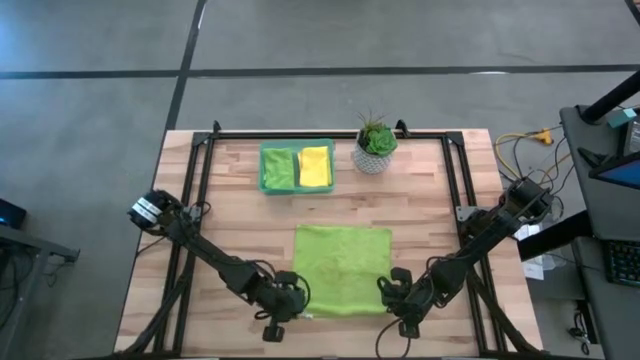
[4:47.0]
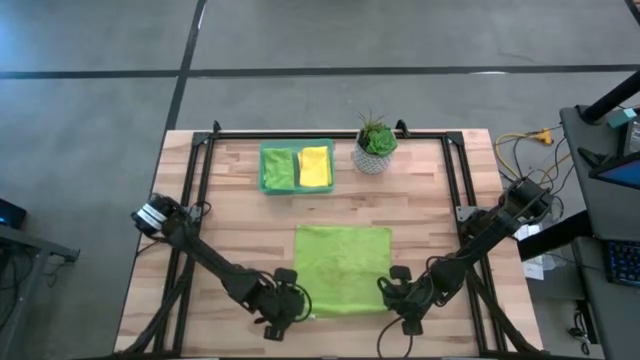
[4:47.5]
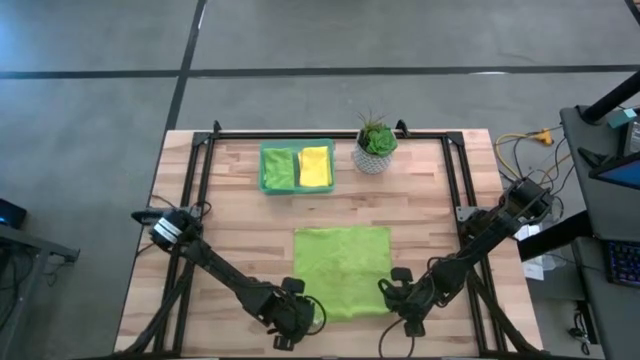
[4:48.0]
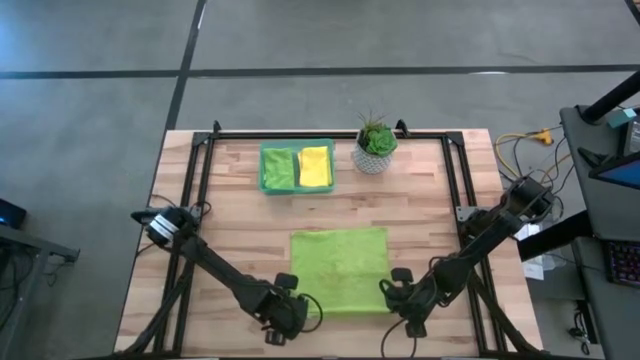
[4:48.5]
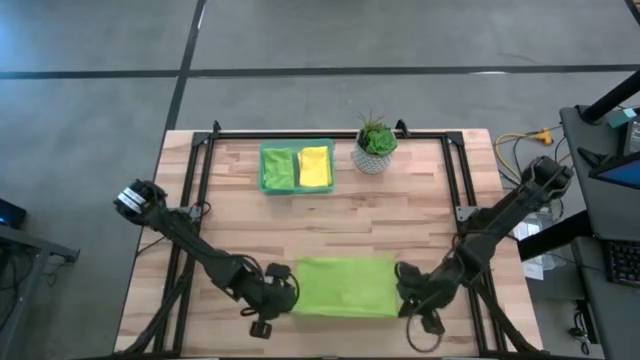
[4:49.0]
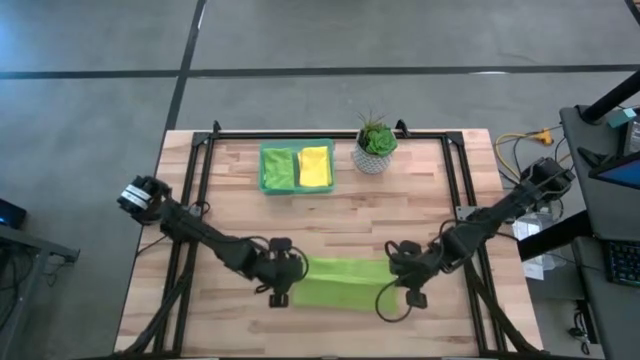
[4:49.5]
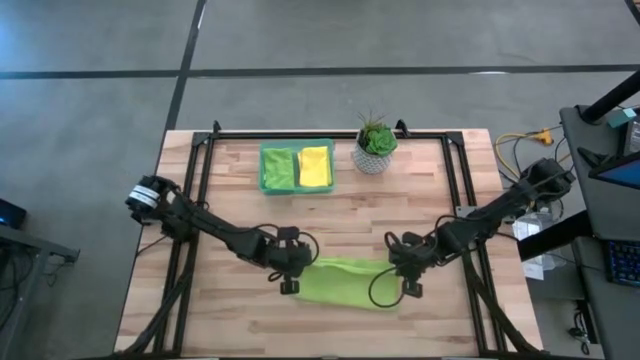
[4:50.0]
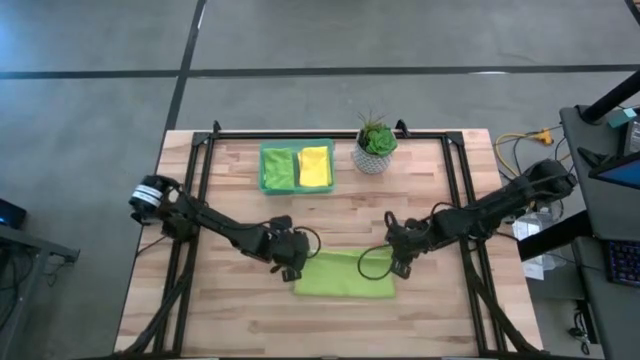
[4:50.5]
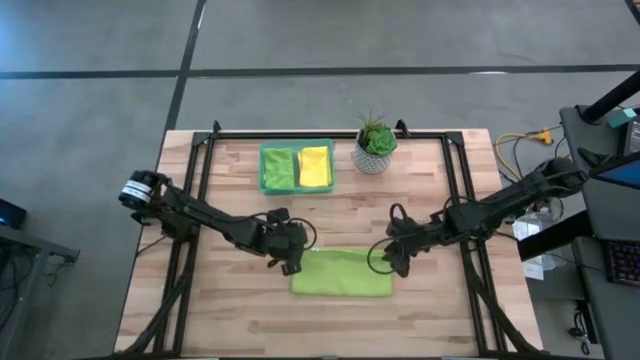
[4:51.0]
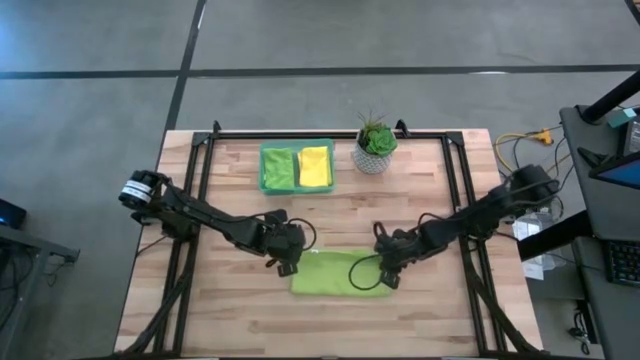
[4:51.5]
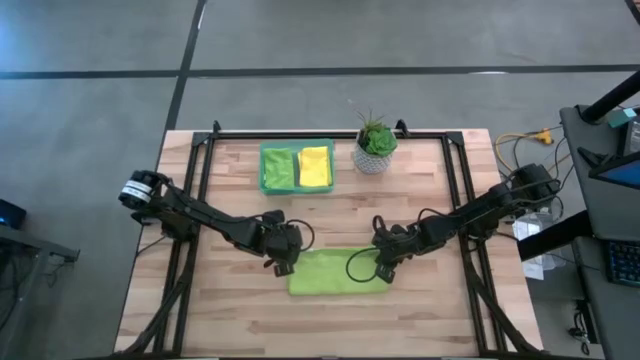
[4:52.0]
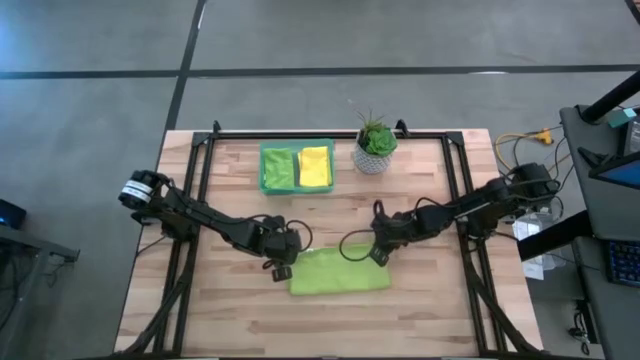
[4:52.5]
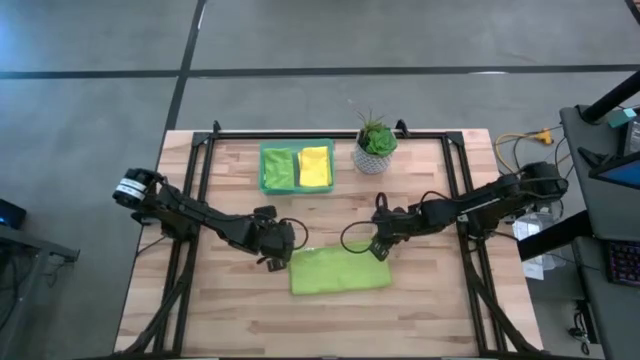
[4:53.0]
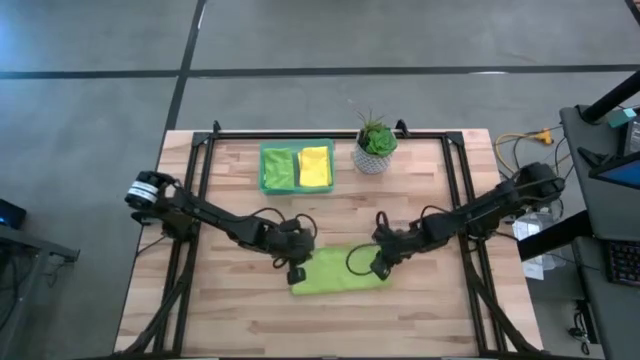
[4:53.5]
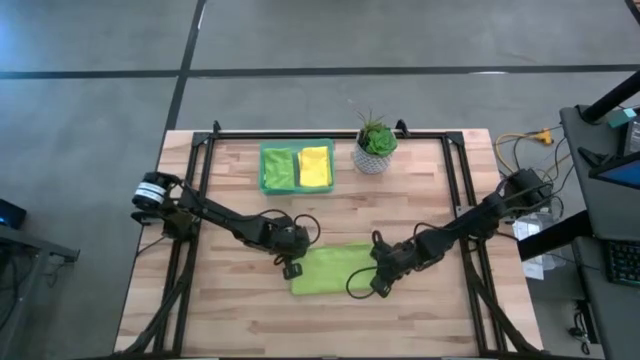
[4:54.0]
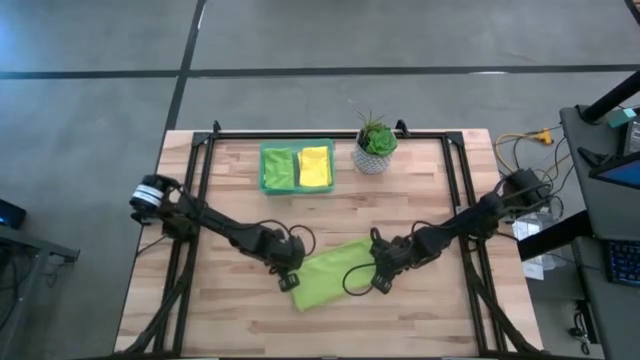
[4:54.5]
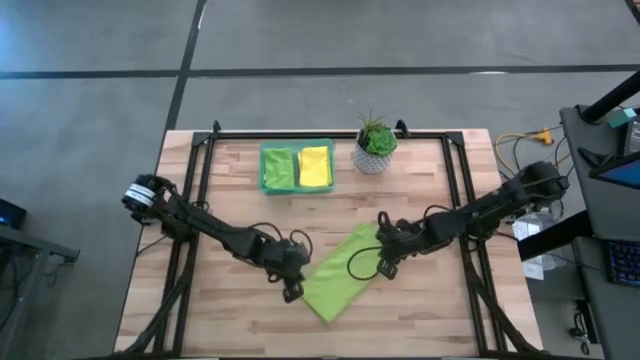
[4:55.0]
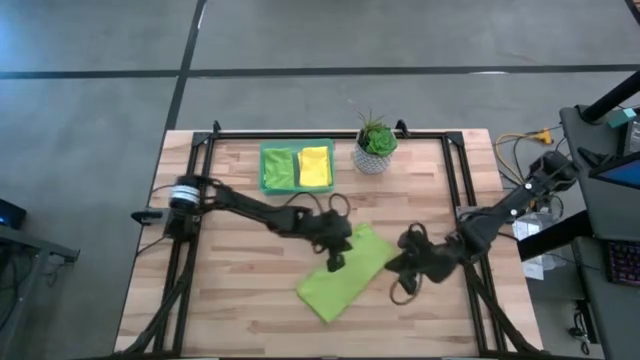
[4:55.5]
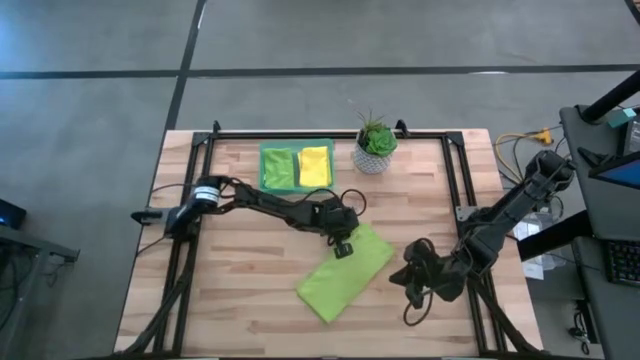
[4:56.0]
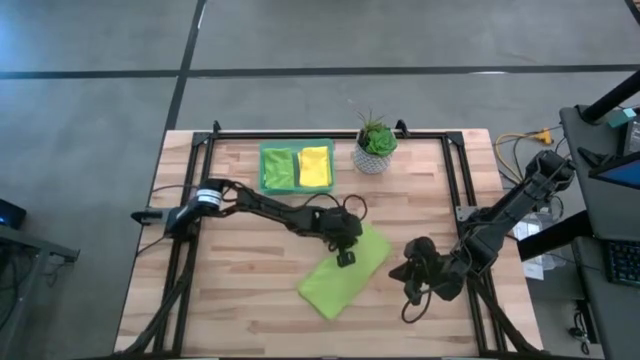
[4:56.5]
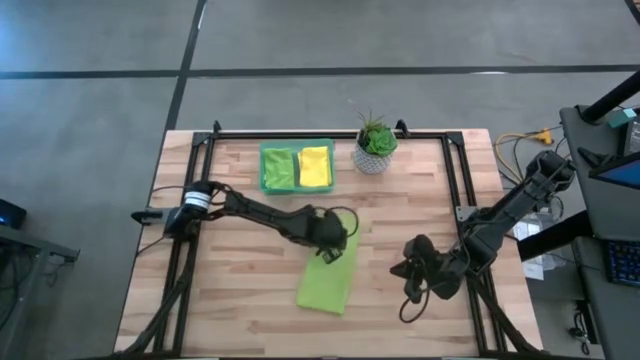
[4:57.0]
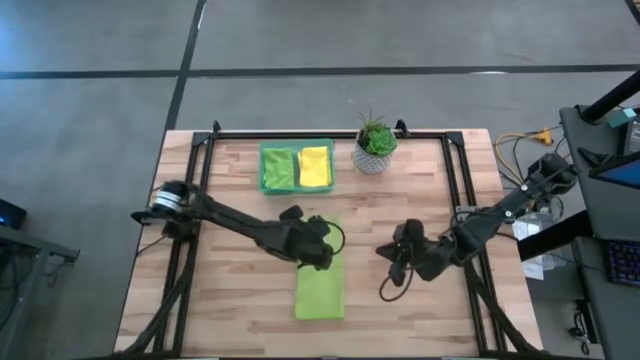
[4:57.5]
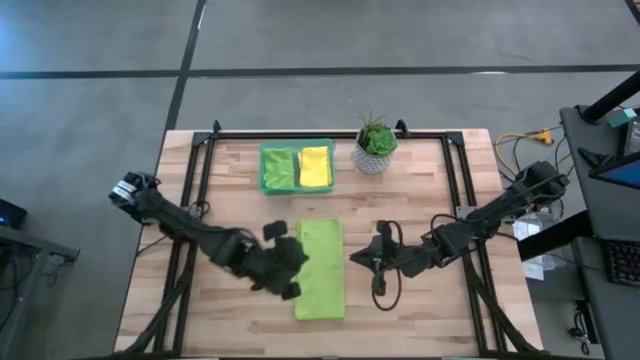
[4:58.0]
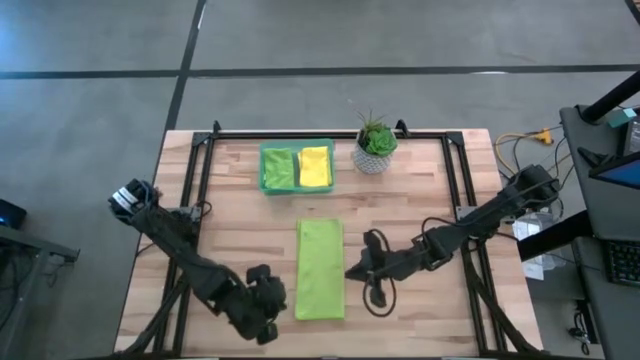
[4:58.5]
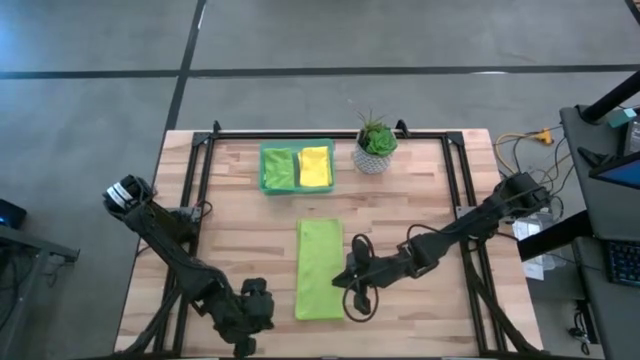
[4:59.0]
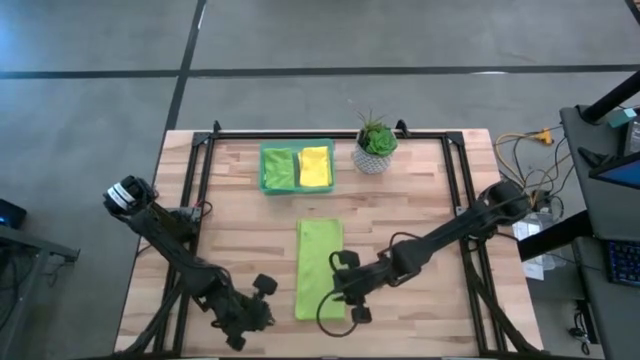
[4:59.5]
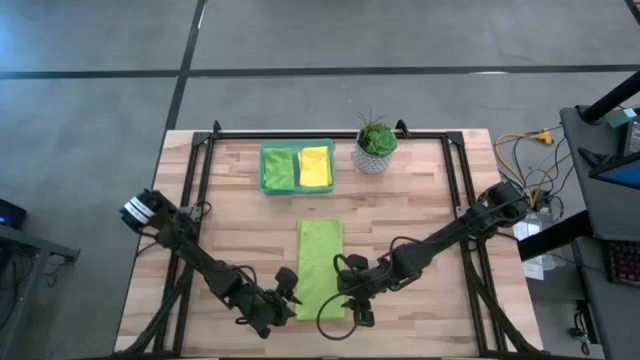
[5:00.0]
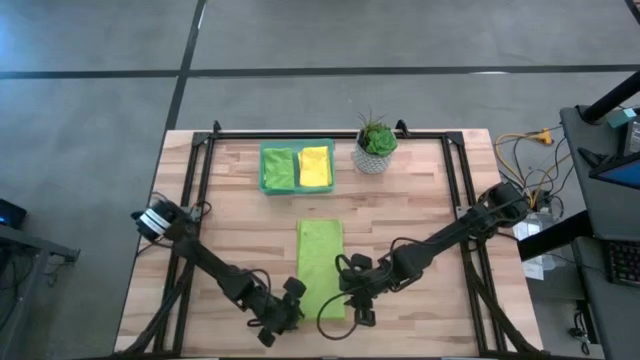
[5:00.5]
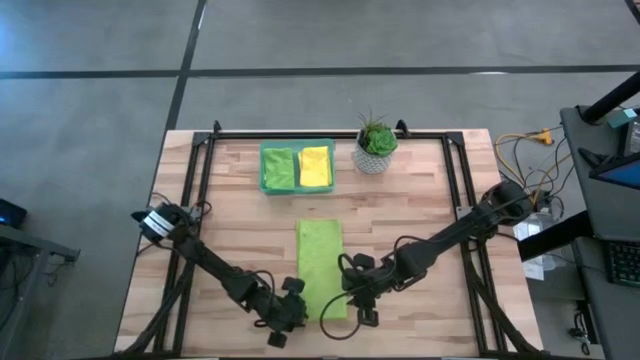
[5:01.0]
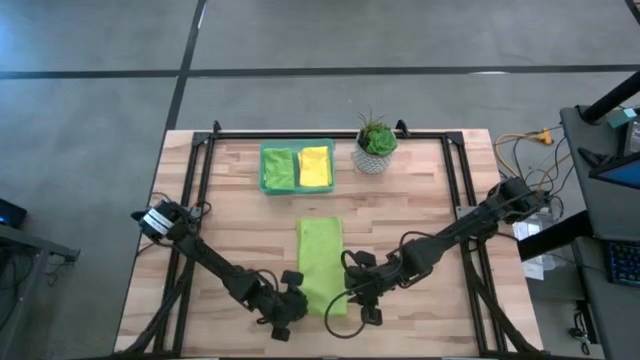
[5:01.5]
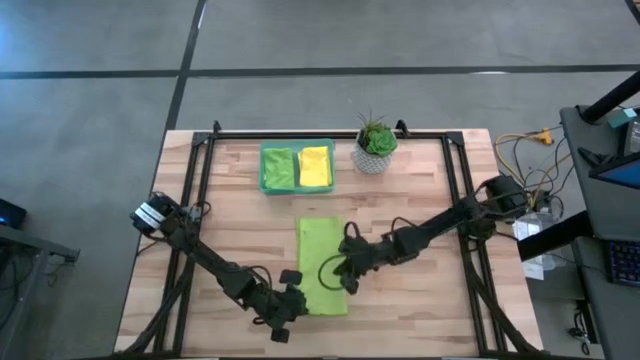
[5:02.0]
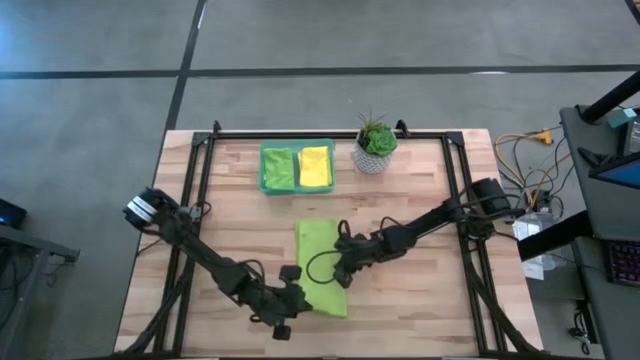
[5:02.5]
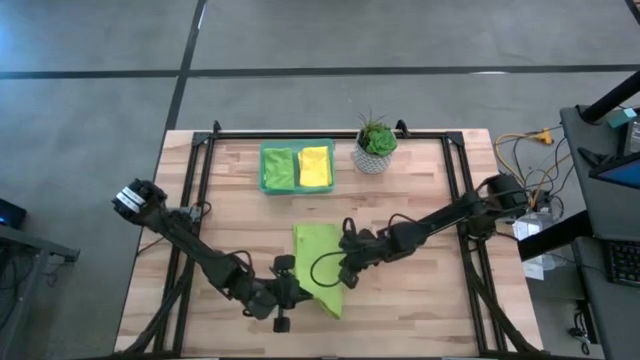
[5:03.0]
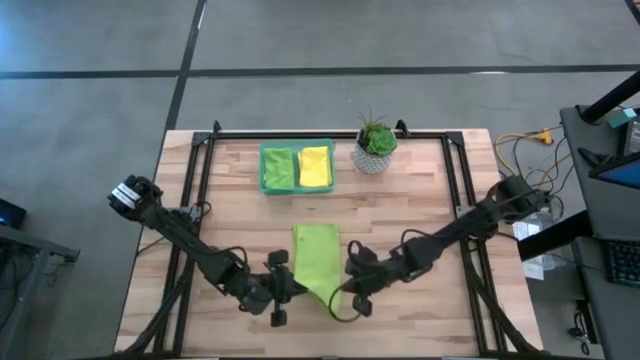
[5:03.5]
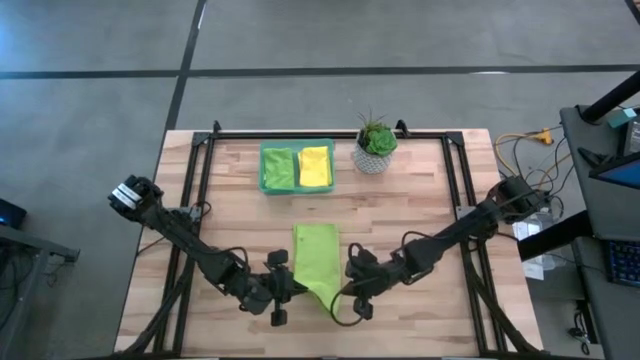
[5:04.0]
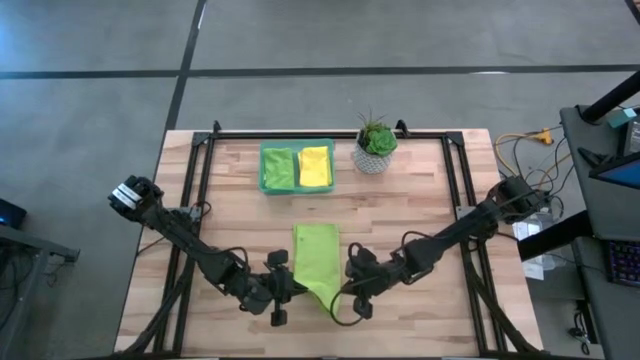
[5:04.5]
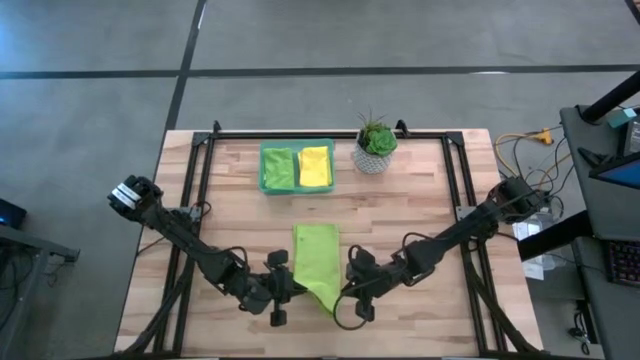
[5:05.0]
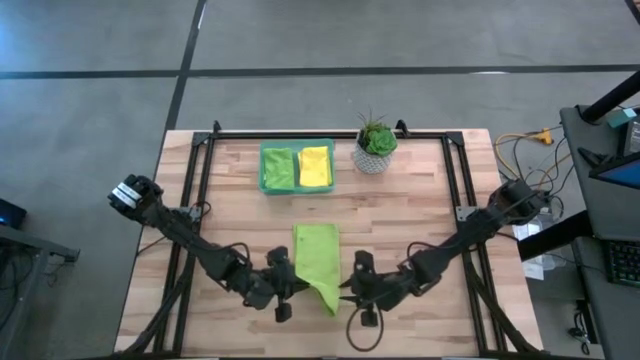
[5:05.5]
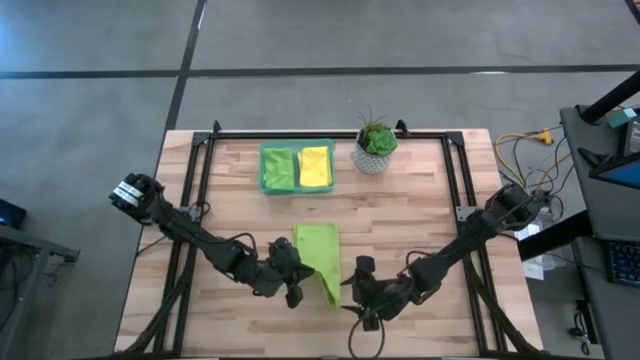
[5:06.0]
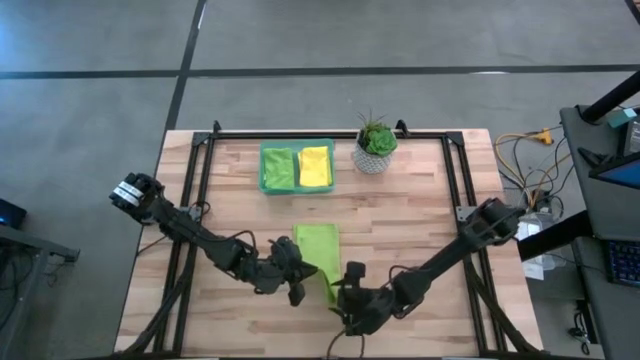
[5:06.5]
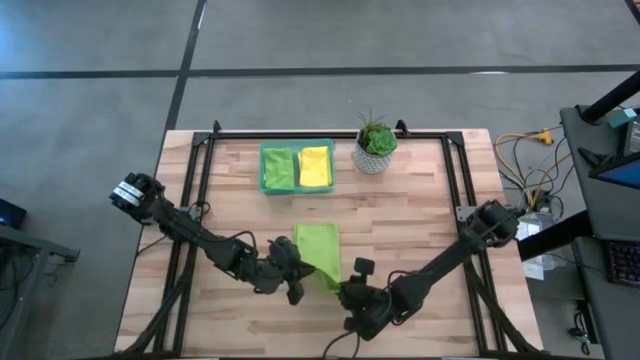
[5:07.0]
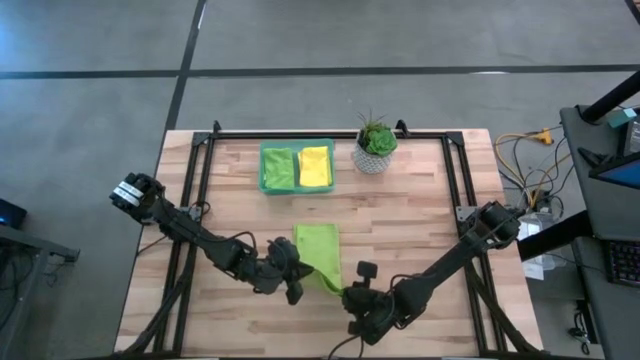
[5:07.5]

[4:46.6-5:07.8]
Task: Fold microfiber towels
Fold the light green microfiber towel
